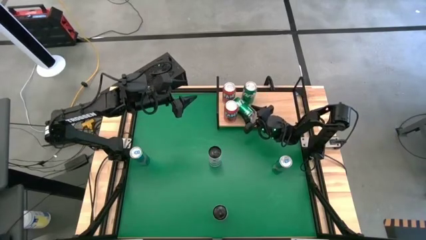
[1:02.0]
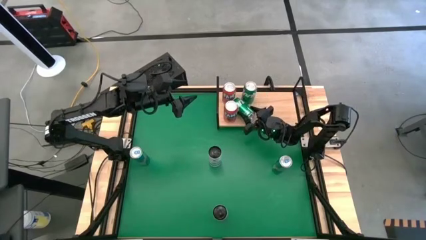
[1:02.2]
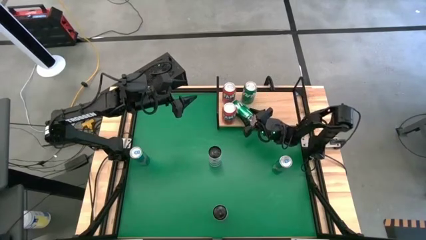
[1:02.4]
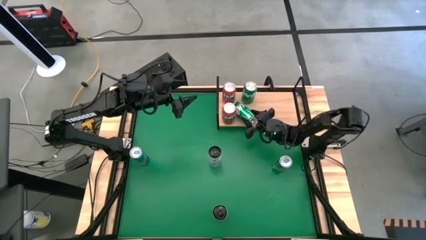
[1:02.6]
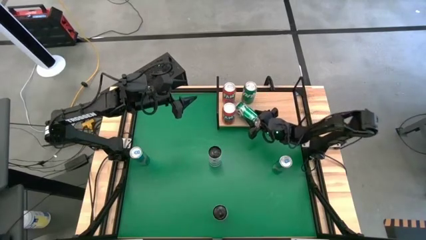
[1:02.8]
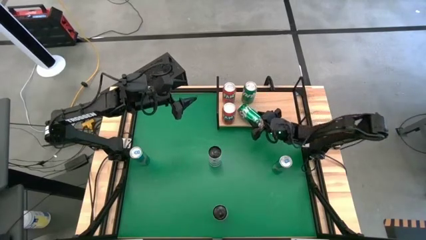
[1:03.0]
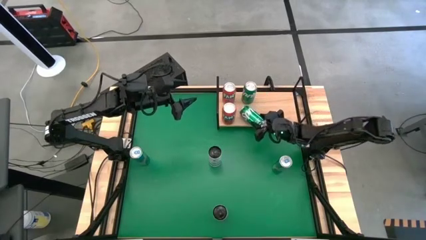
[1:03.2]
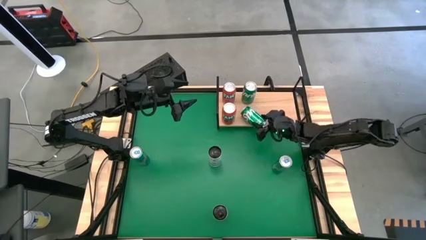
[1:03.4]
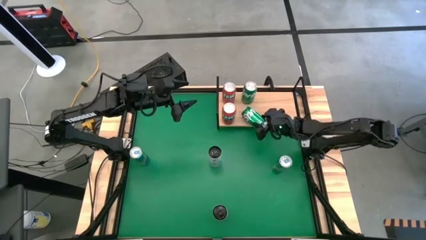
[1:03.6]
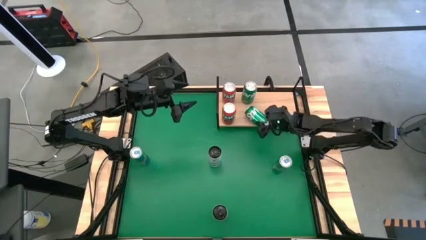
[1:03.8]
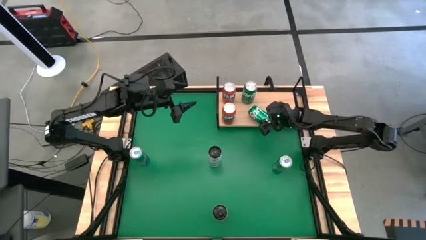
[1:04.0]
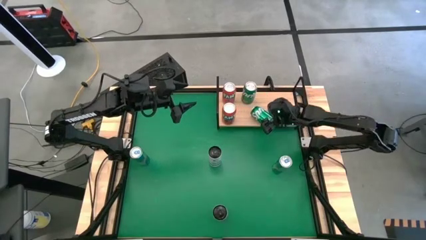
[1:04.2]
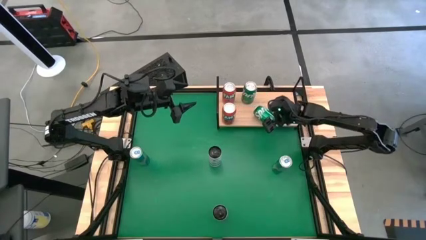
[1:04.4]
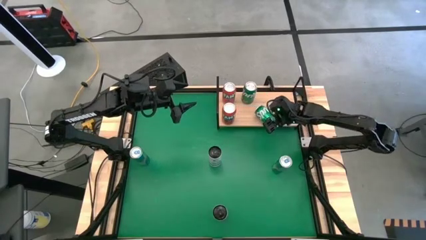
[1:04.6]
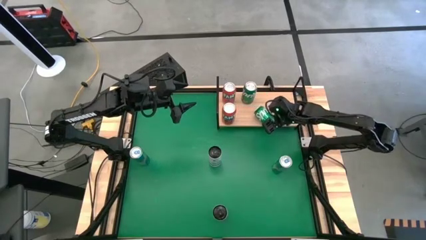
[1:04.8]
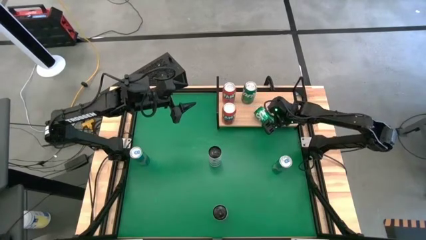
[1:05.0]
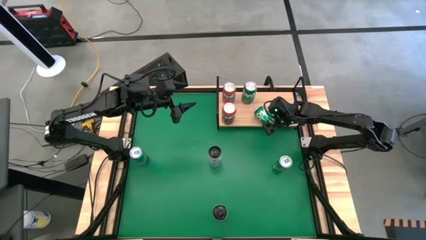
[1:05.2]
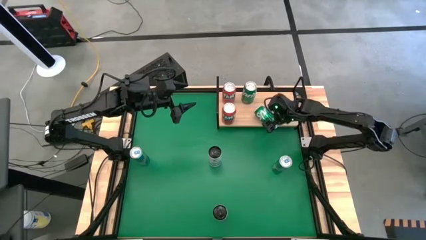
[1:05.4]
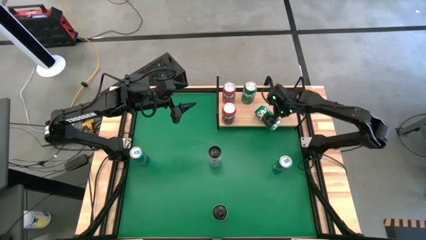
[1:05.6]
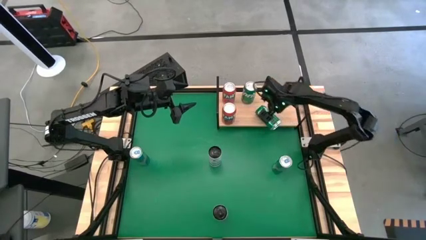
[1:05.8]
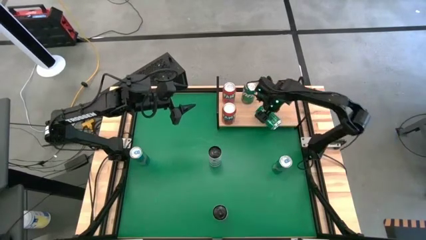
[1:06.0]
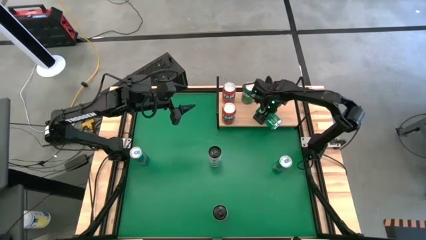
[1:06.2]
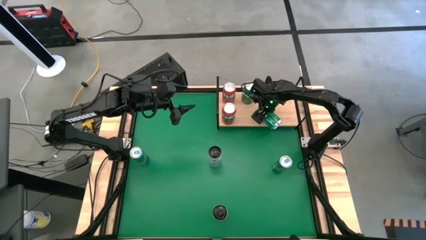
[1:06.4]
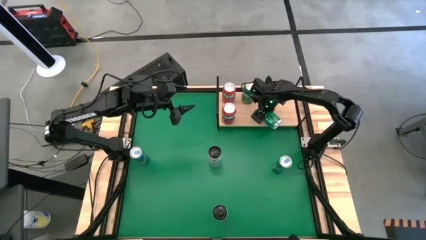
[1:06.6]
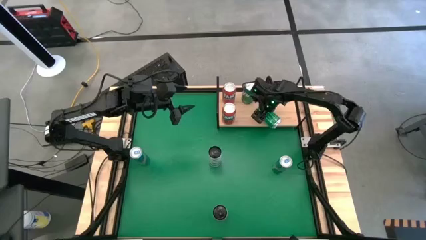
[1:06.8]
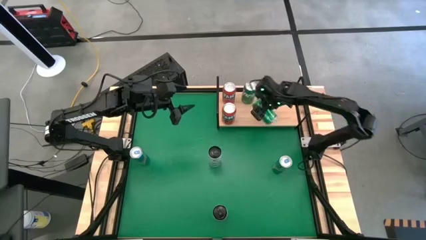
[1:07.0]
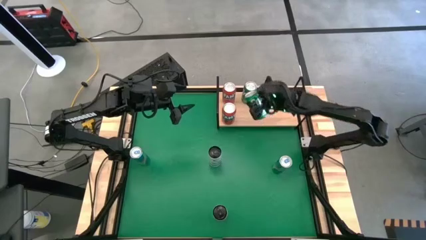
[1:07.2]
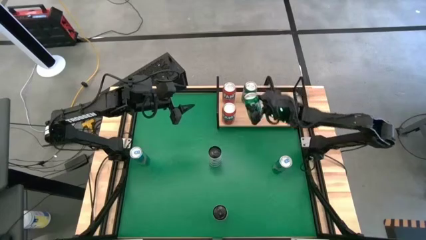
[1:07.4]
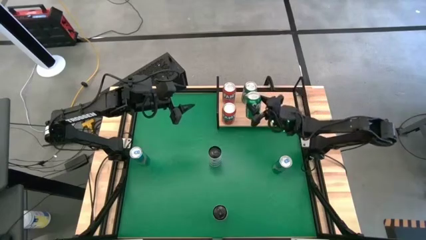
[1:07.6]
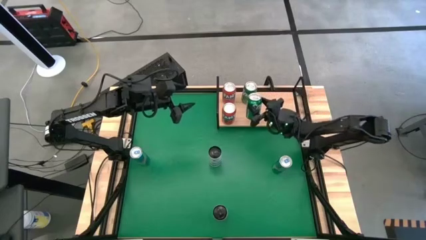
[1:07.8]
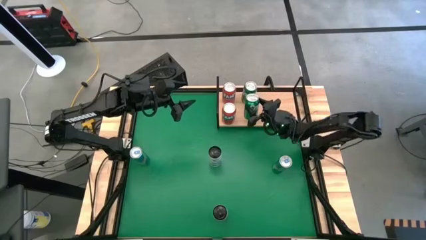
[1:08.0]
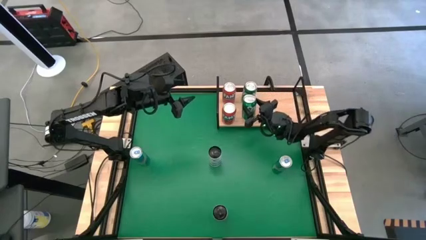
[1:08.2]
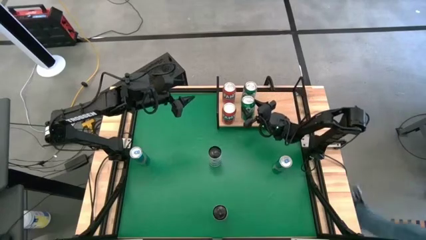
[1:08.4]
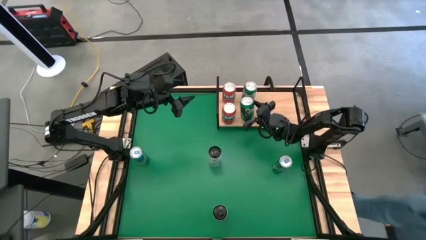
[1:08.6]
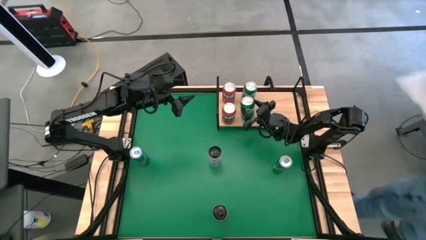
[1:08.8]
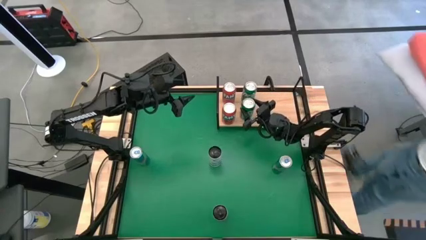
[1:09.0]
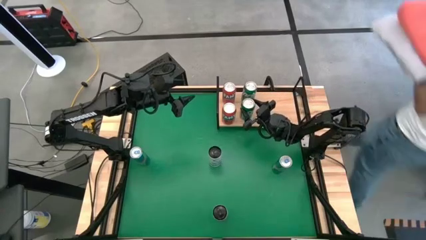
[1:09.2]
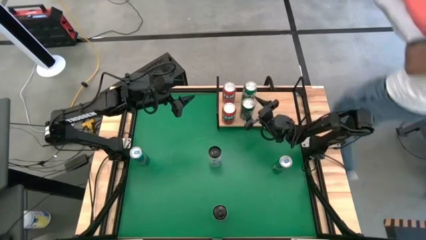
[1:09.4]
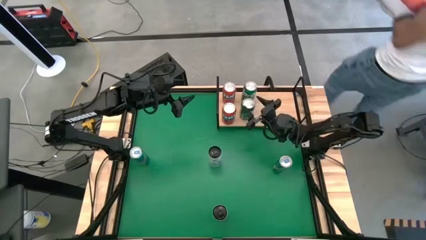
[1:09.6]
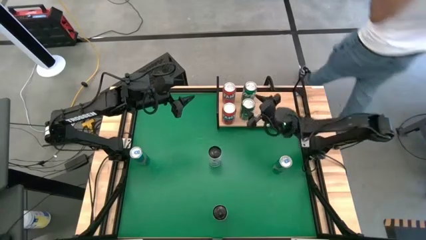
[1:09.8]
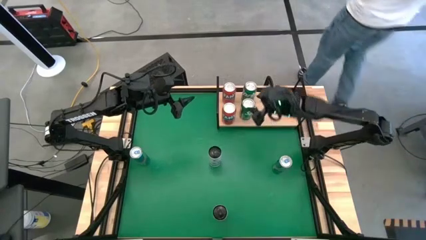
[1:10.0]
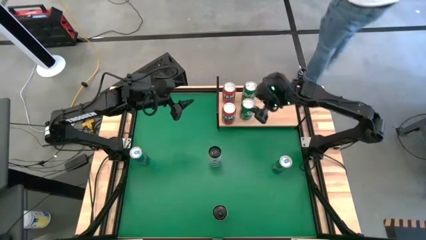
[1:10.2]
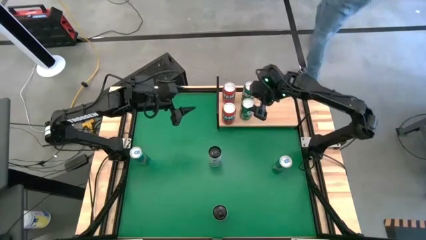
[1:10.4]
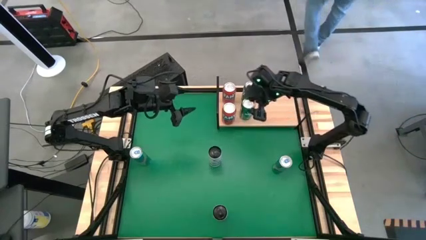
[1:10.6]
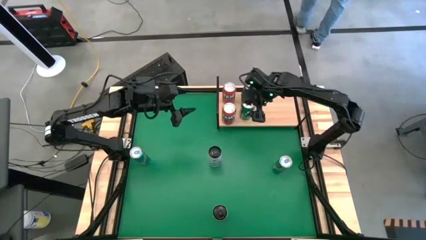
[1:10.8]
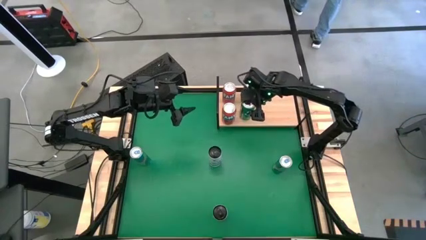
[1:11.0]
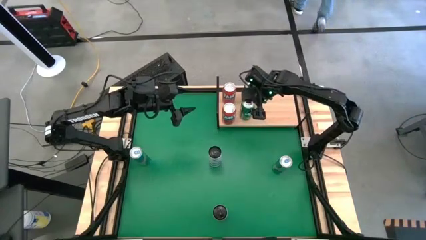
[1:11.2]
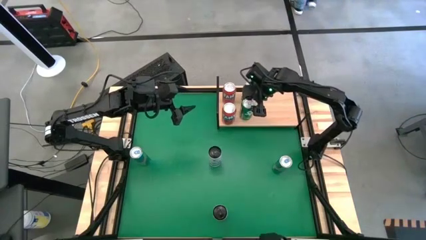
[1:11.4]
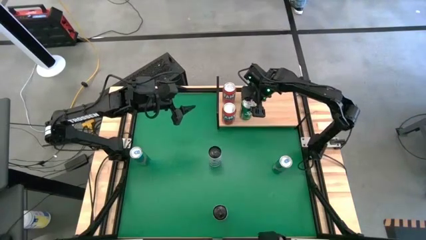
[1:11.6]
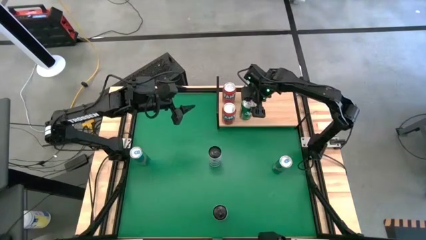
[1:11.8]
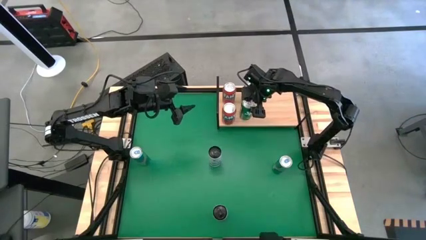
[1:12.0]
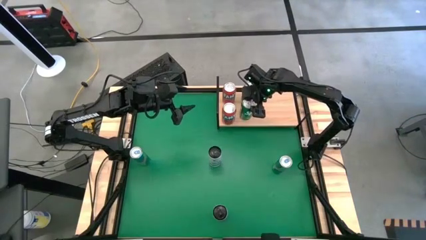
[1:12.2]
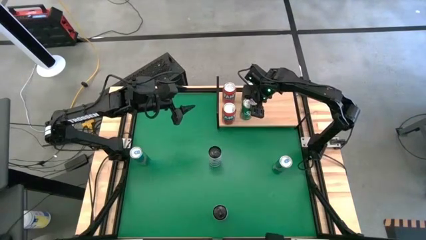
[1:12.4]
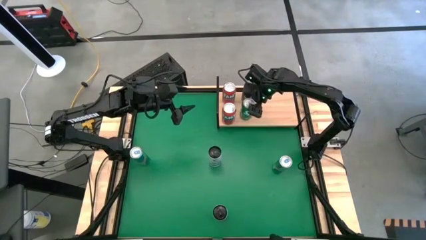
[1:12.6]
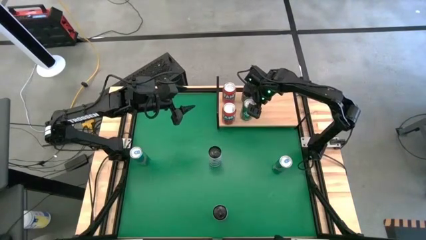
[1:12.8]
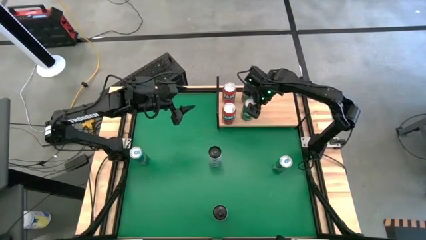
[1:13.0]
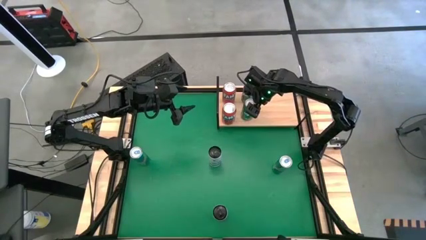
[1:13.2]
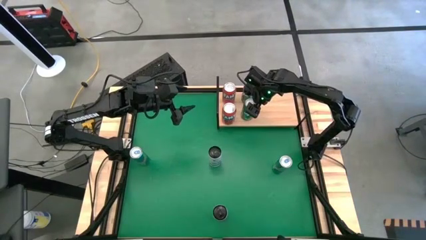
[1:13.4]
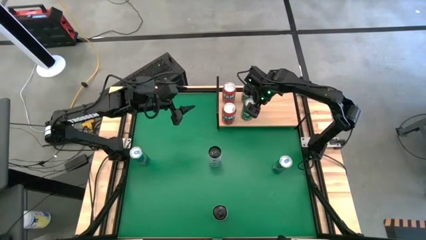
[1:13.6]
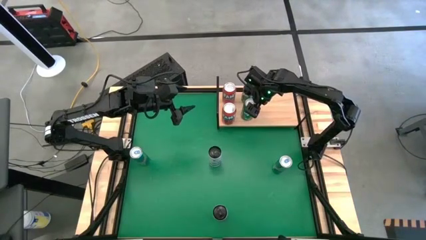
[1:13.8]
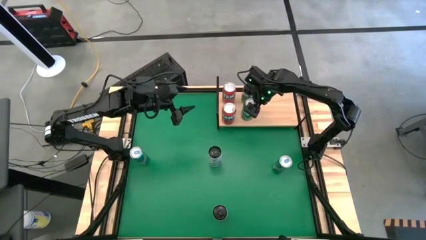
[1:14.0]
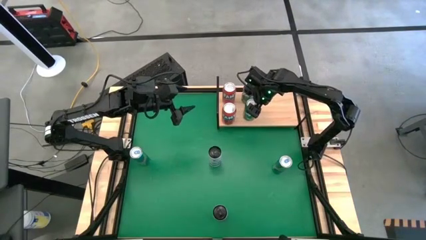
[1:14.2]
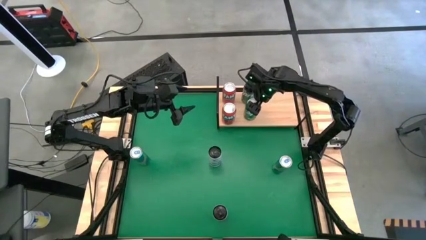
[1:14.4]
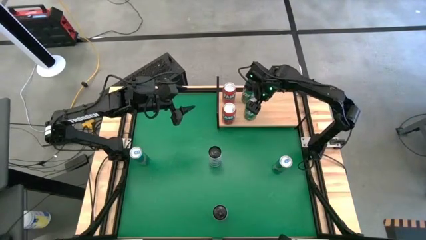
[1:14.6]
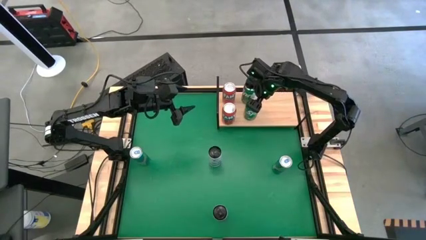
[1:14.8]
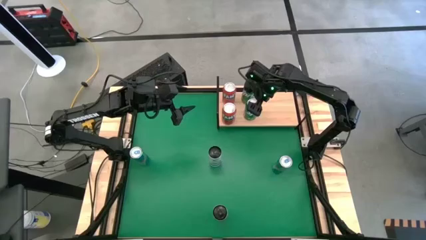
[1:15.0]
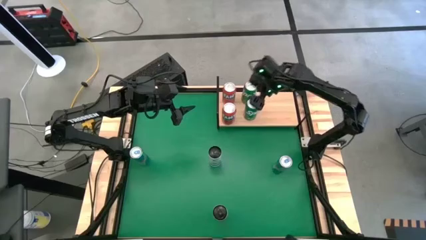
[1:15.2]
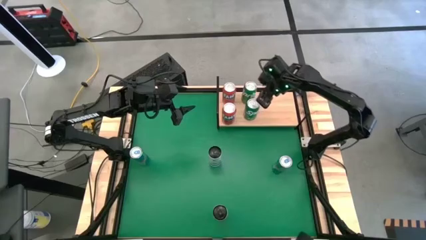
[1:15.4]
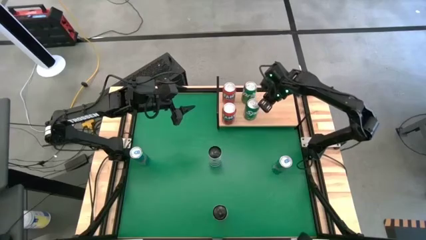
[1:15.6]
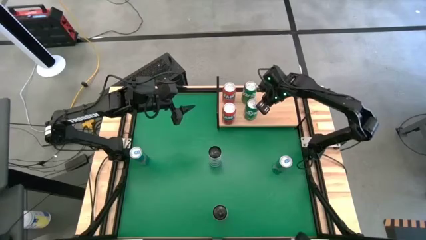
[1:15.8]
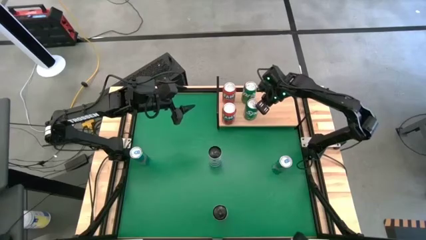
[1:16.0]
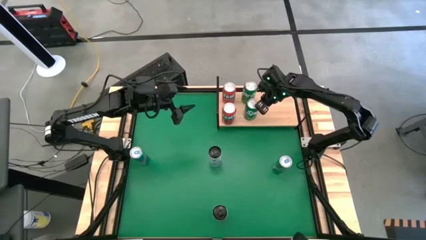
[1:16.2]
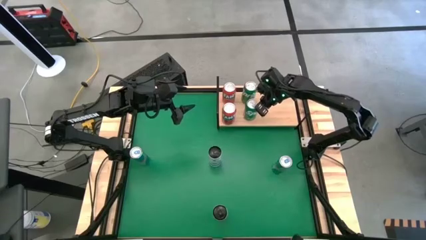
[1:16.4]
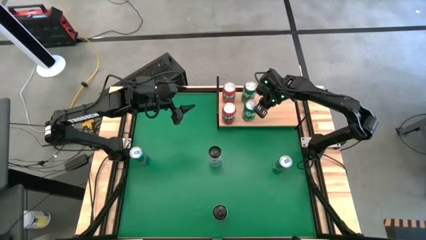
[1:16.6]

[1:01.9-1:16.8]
Task: Place canned beverage on shelf
Put the green soda can on the shelf aligned with the other green soda can

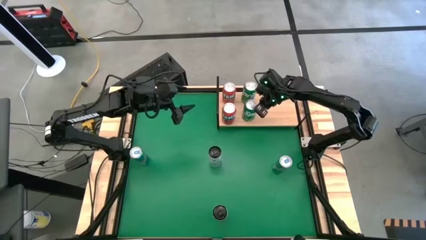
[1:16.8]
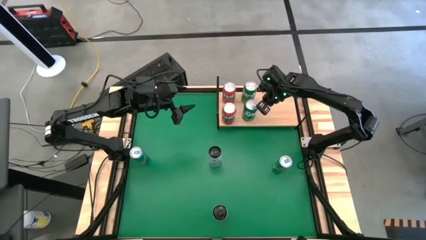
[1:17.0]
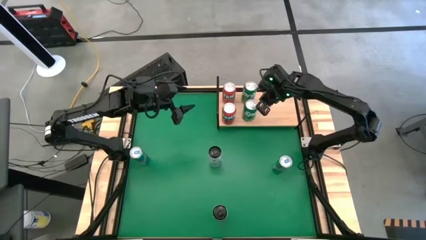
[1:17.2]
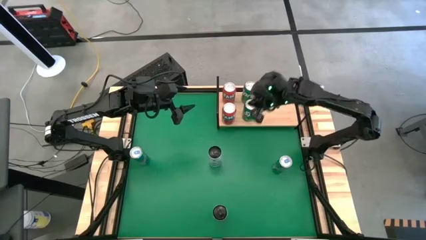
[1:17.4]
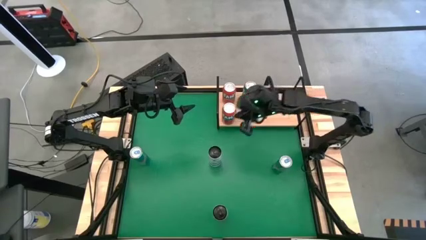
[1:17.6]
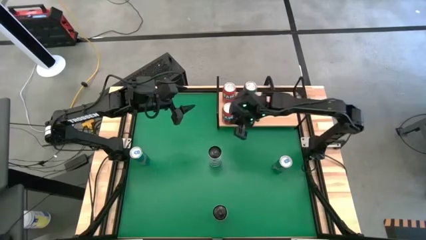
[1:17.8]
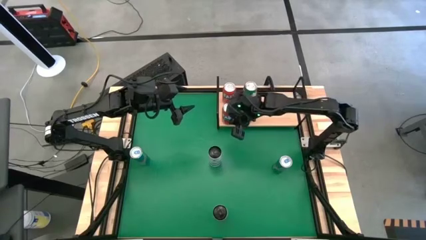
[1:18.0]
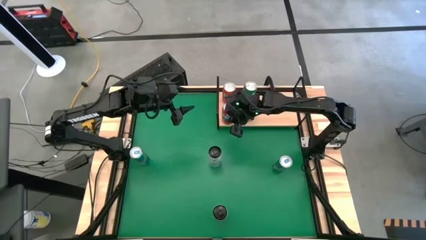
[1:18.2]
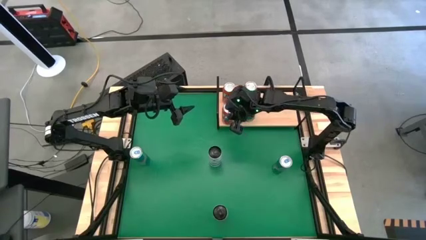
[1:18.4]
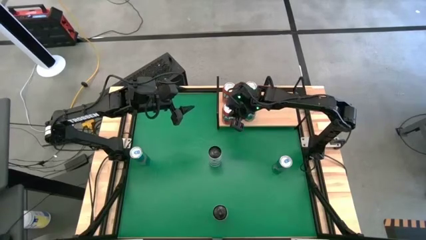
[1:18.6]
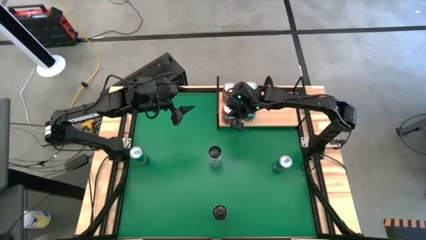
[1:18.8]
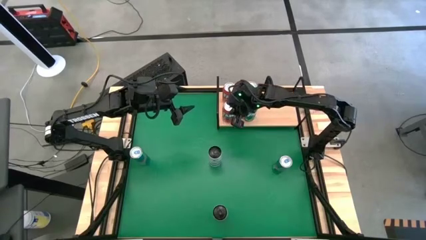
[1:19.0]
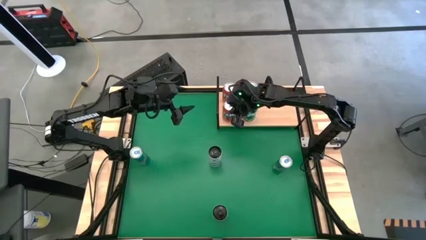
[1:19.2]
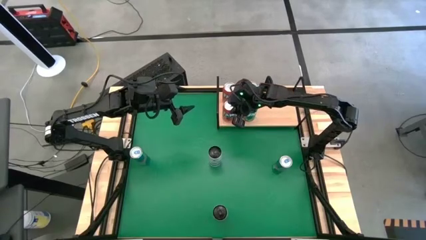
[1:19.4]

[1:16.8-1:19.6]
Adjust the orange soda can on the shelf
